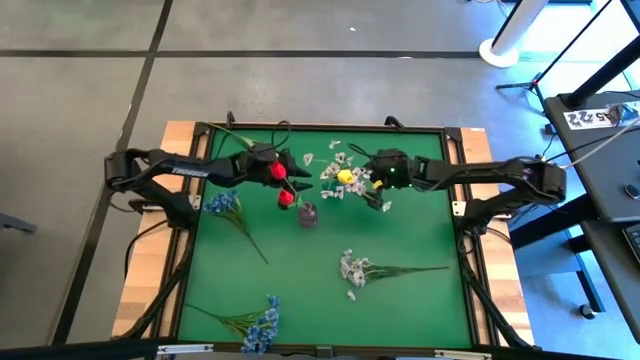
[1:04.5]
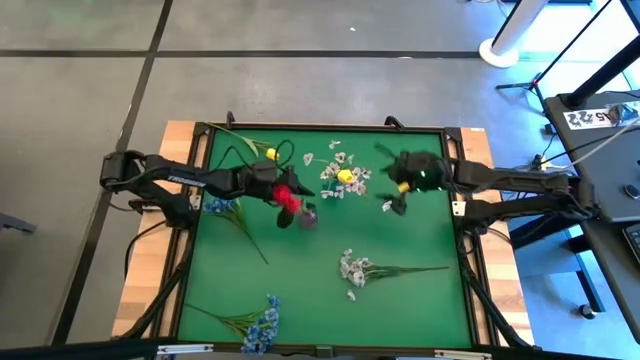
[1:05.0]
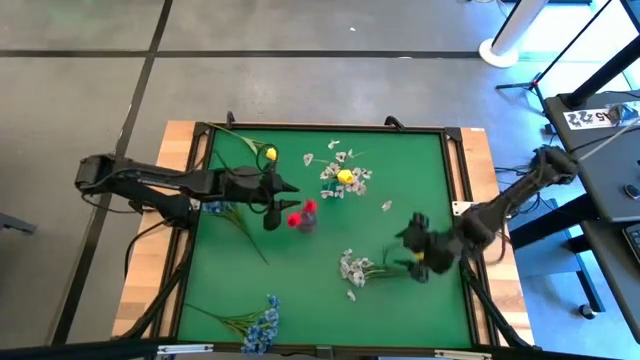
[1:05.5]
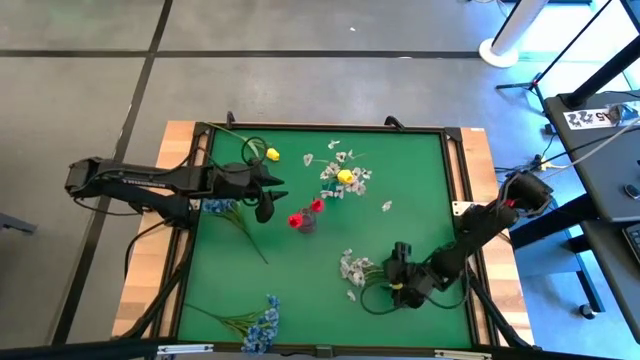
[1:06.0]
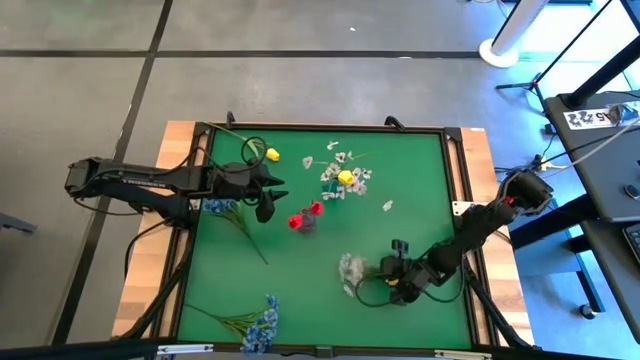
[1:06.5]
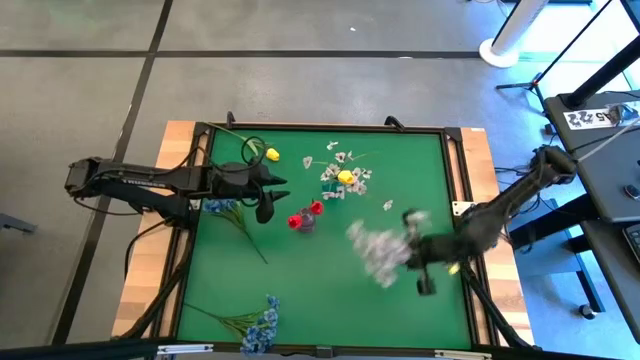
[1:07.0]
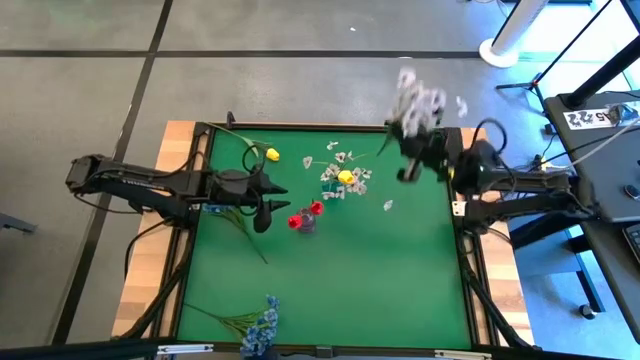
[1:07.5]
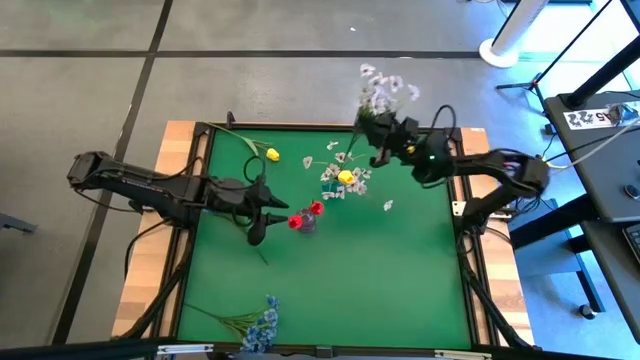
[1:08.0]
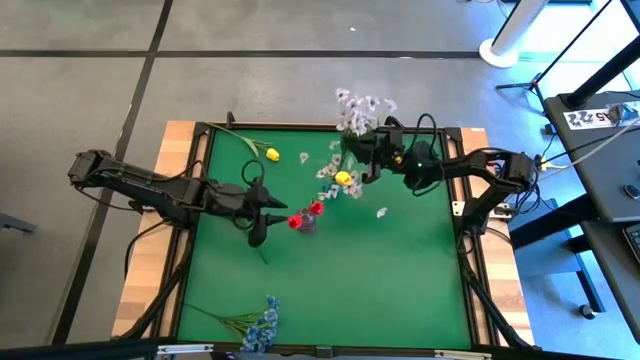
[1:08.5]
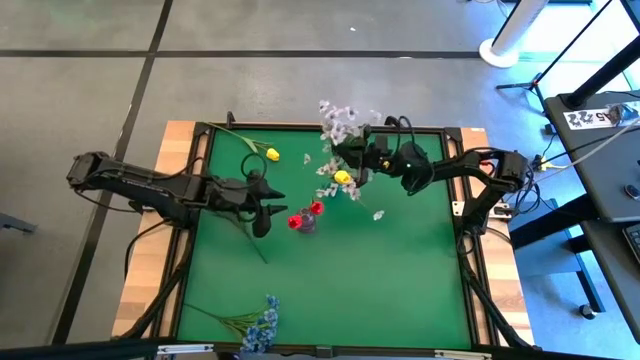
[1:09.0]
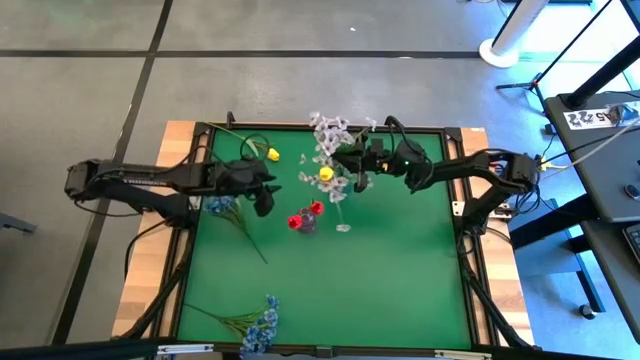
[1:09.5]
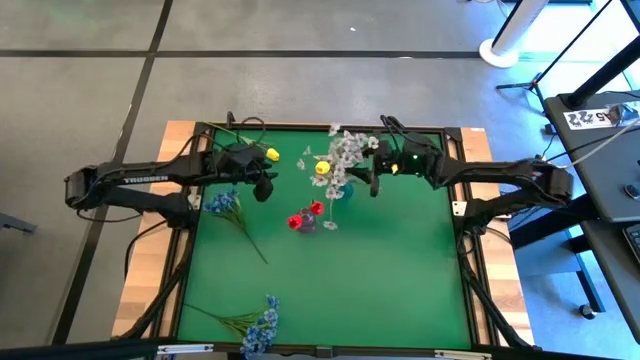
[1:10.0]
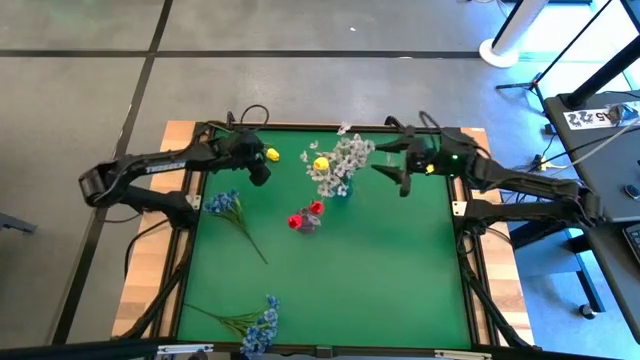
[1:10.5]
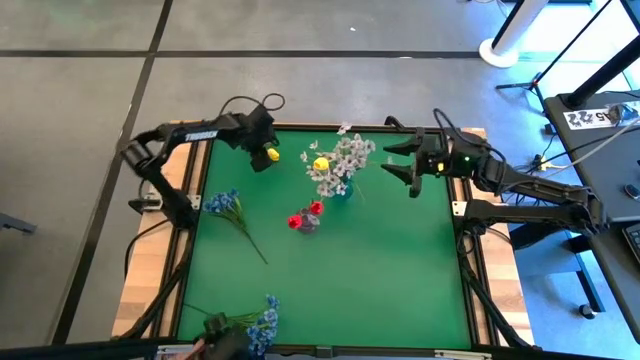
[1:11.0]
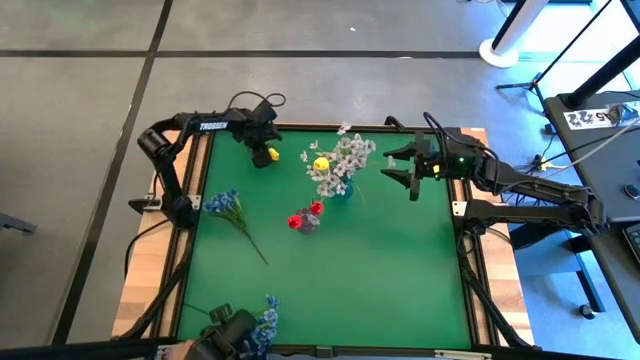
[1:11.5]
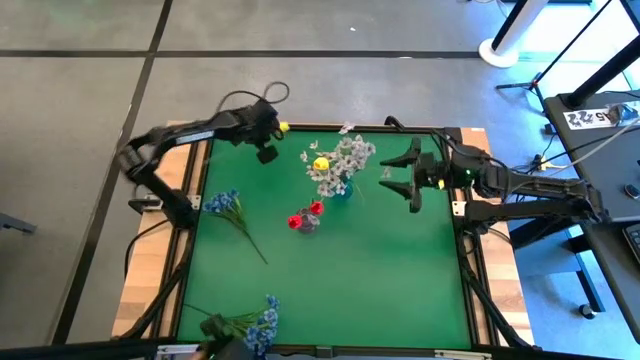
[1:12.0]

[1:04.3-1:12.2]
Task: Sort flowers into vase by color
Put the white flowers into the blue vase

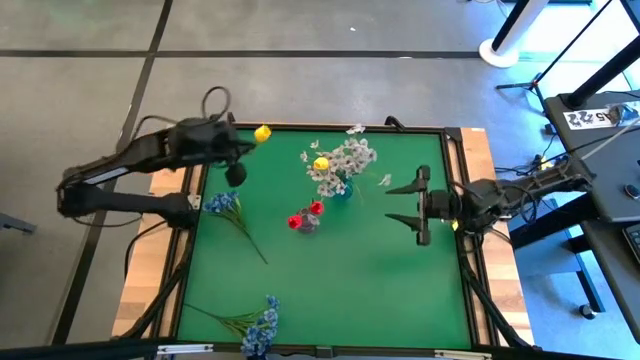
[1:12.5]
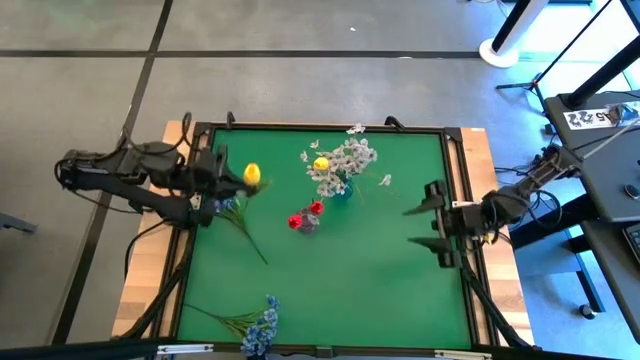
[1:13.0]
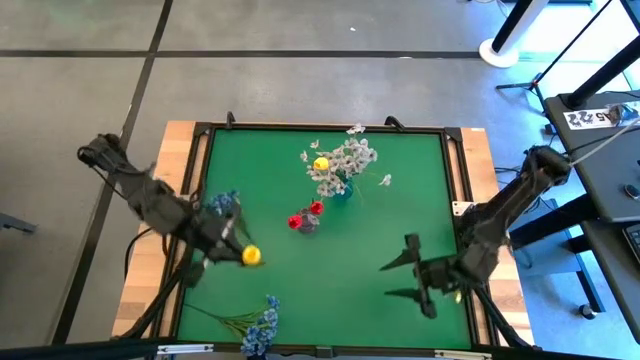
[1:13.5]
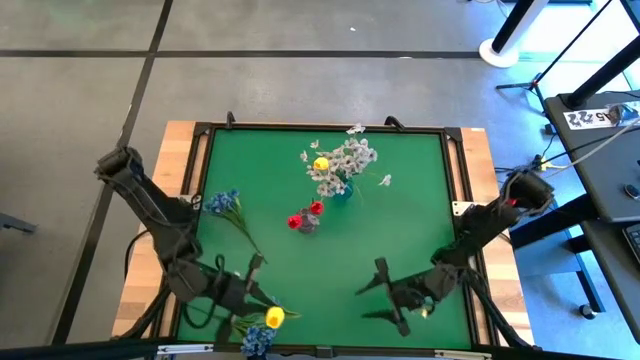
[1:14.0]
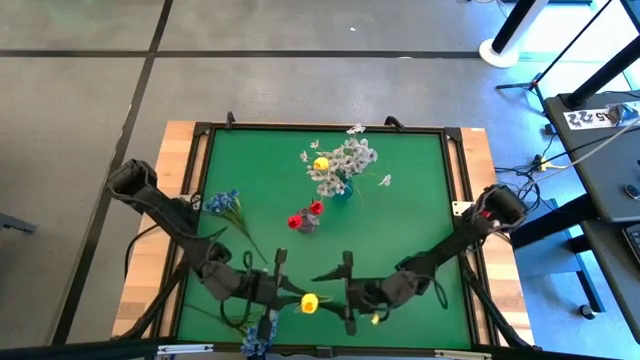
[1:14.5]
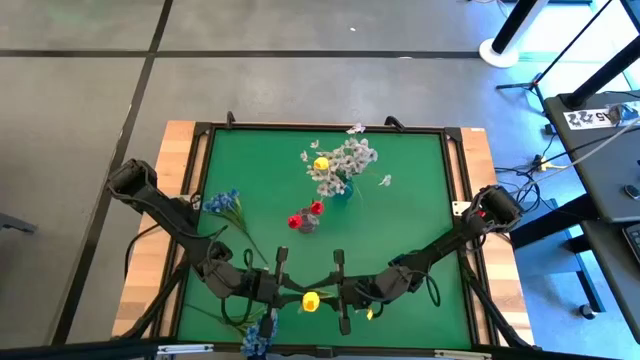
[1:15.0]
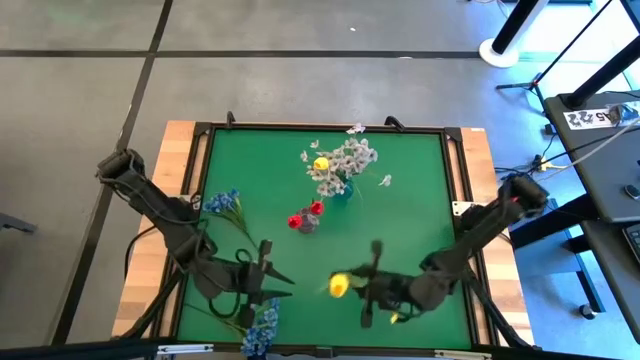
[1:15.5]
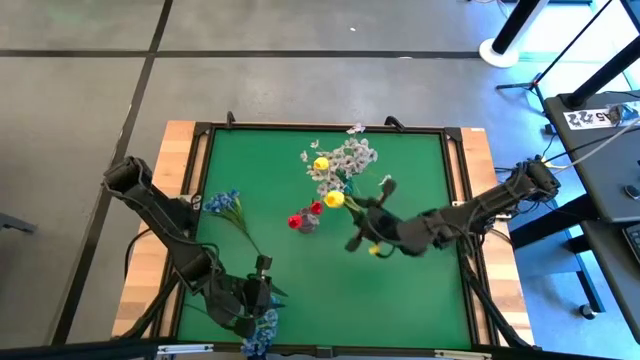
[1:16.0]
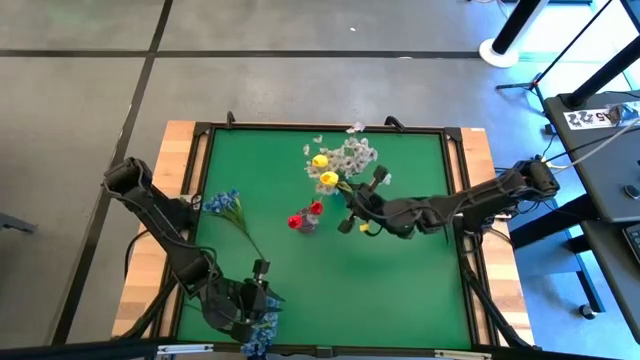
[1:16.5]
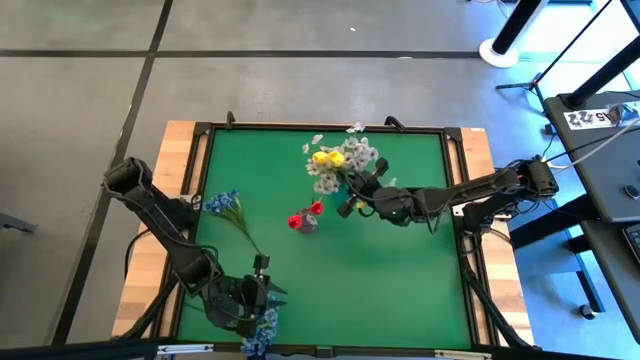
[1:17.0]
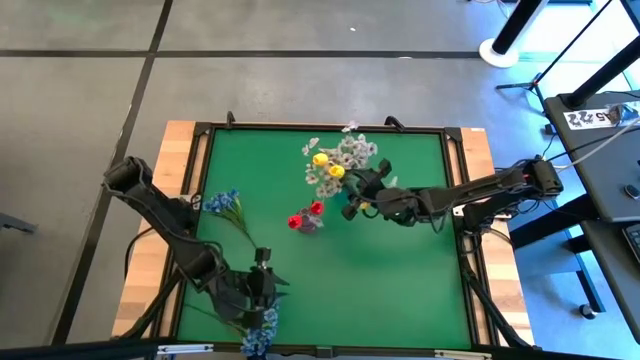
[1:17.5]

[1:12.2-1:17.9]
Put the yellow tulip into the blue vase

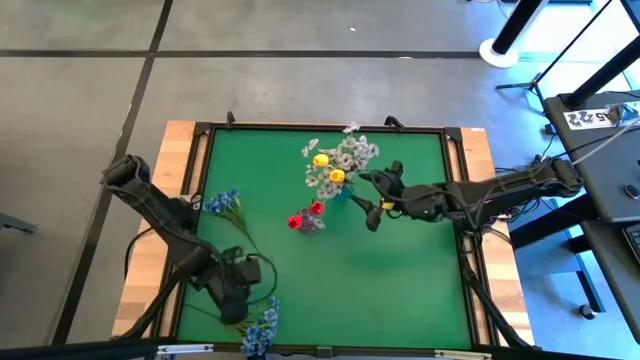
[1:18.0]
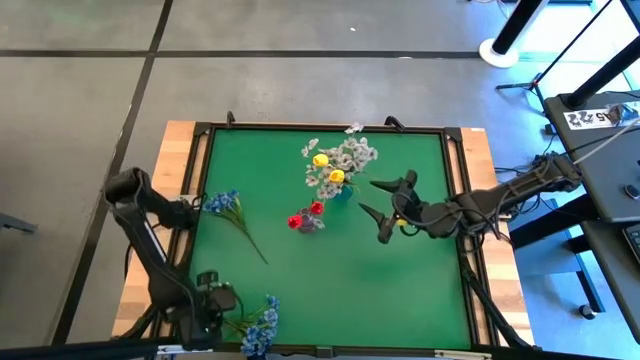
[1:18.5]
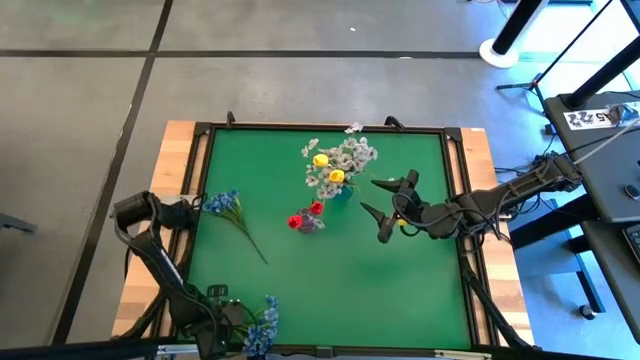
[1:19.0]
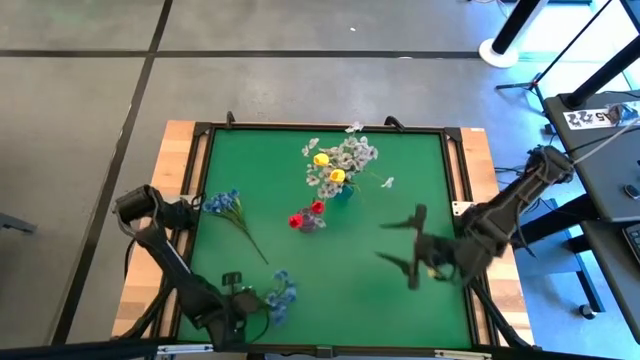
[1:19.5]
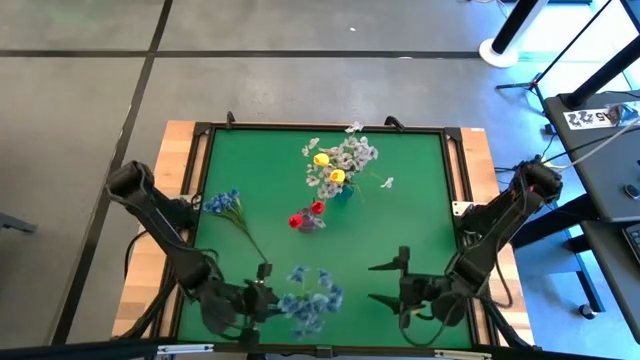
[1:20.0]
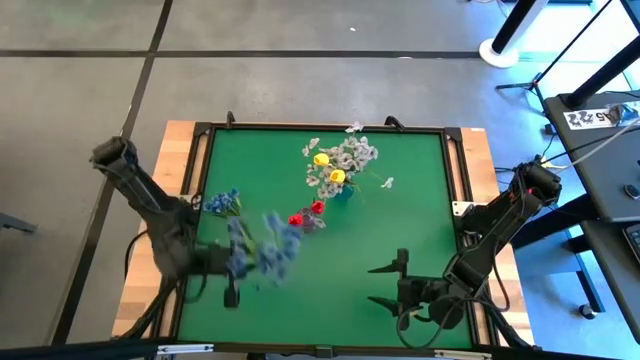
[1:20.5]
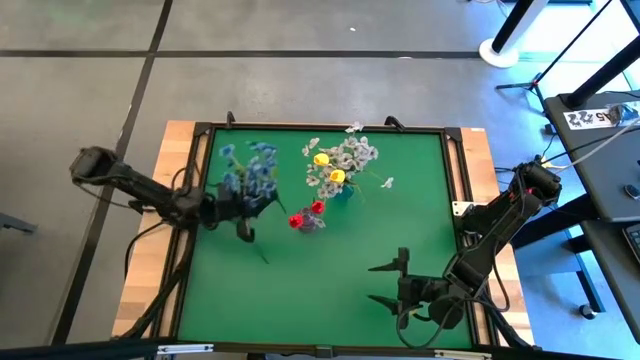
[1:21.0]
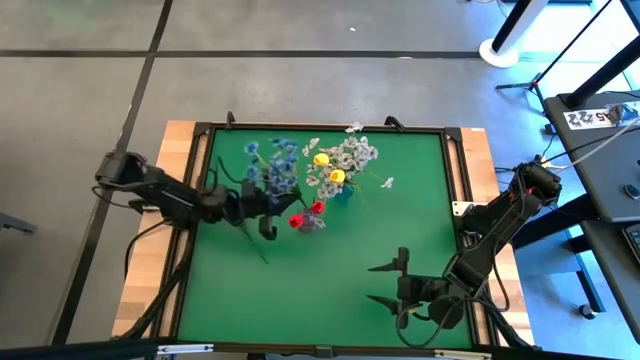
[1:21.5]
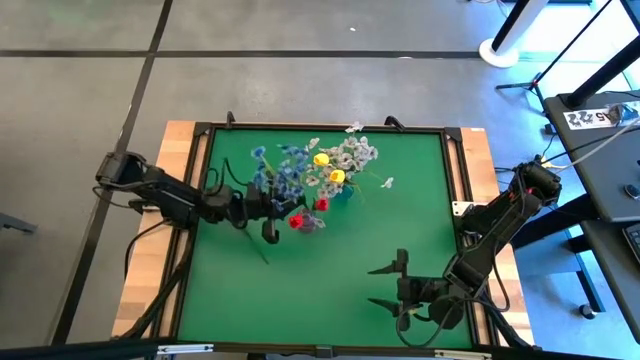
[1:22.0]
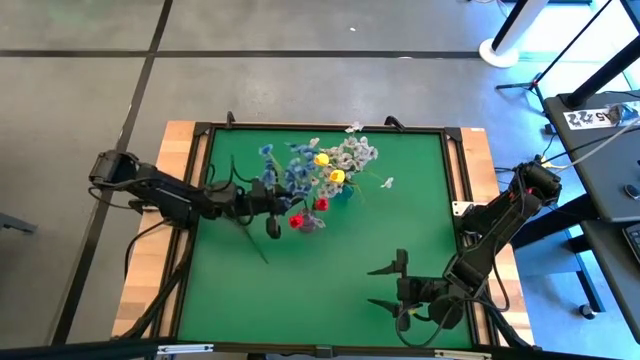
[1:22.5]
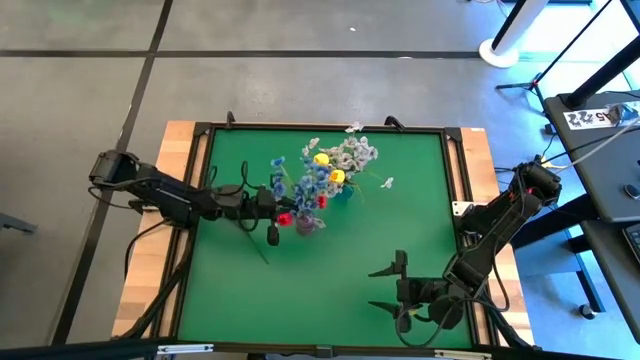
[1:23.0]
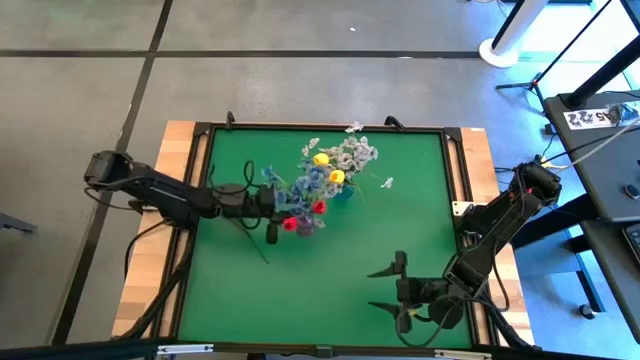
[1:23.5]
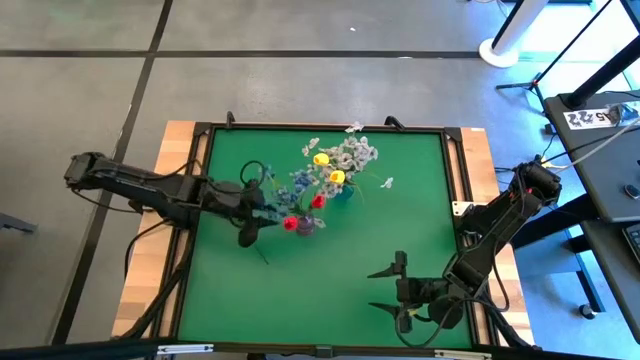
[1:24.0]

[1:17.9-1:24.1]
Put the blue flowers into the purple vase

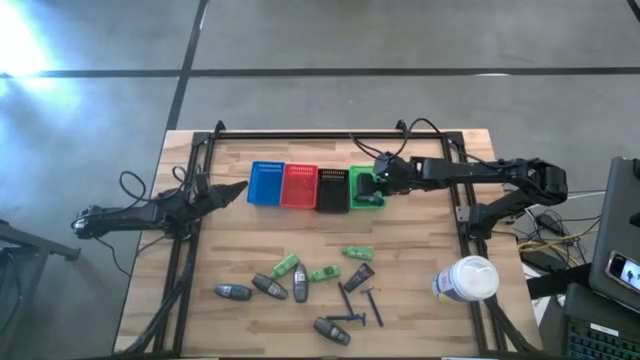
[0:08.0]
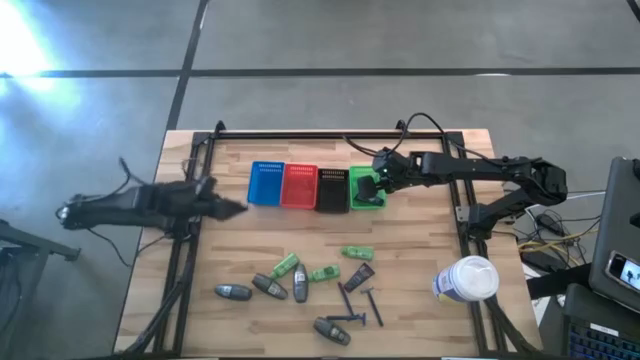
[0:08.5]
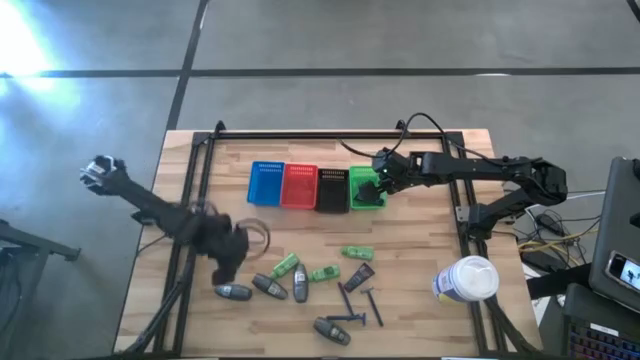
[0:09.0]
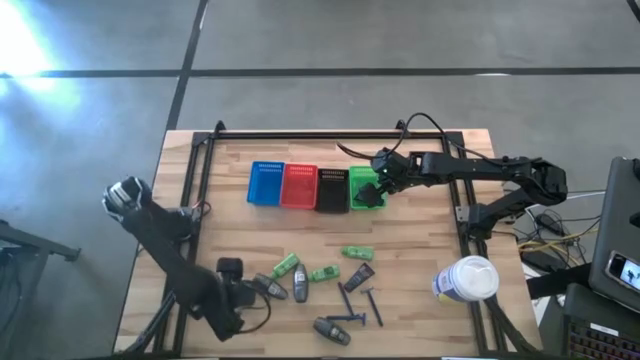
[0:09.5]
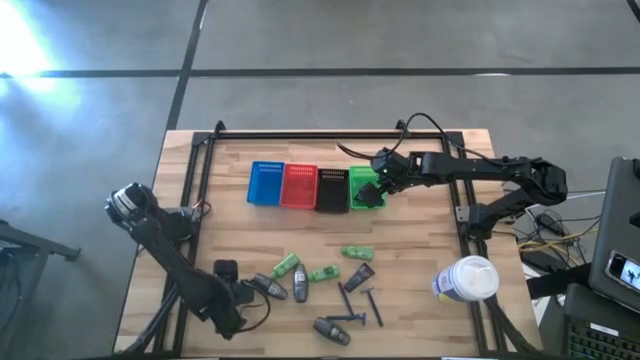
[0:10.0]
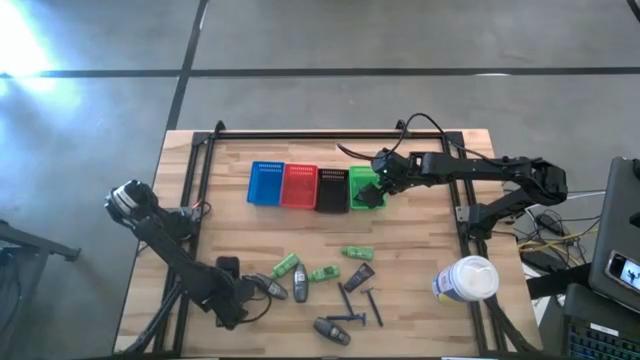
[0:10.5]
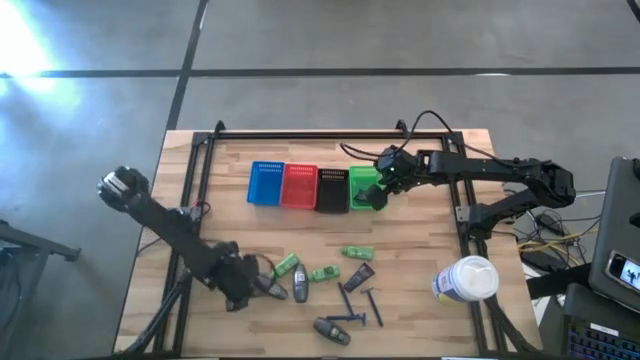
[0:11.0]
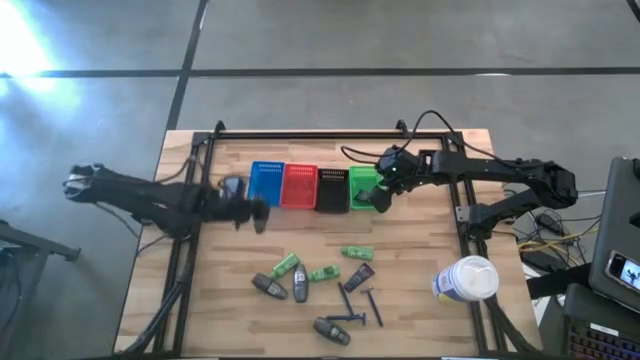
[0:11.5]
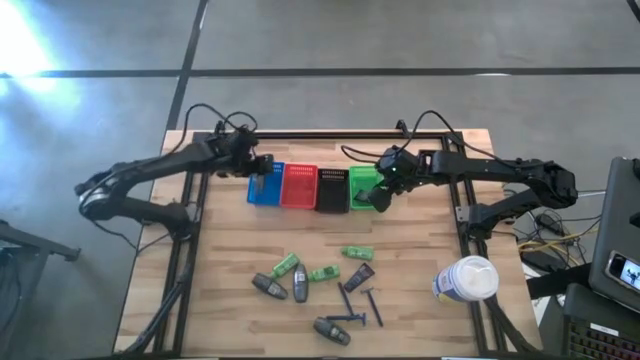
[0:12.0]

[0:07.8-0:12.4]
Task: Pick & Place Travel size toiletries
Put the deodorant into the blue basket
